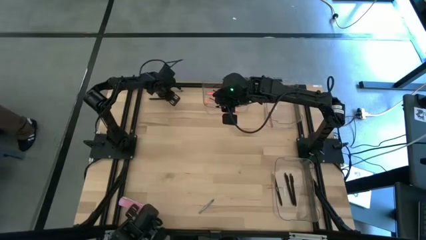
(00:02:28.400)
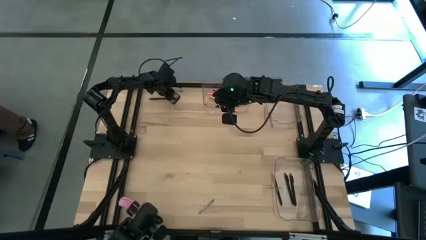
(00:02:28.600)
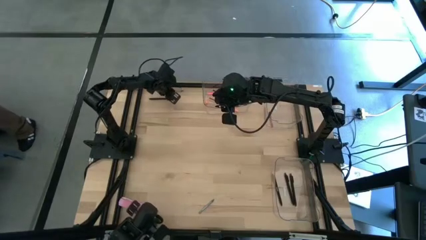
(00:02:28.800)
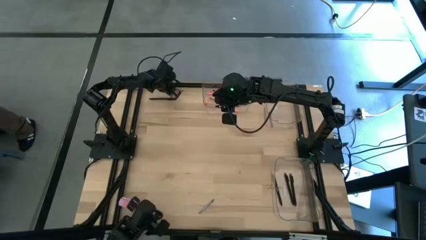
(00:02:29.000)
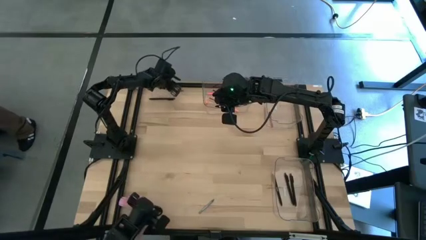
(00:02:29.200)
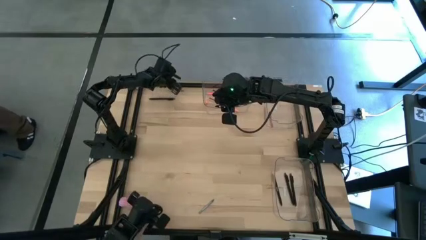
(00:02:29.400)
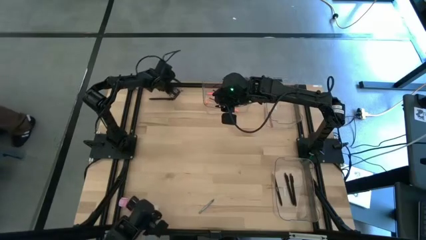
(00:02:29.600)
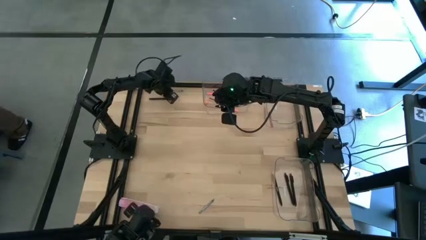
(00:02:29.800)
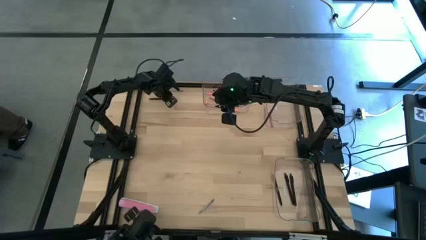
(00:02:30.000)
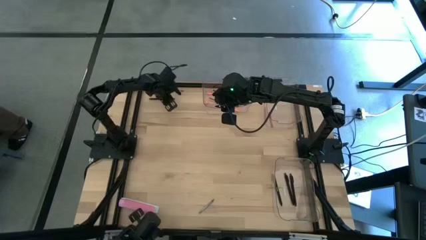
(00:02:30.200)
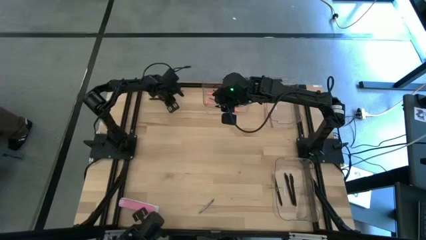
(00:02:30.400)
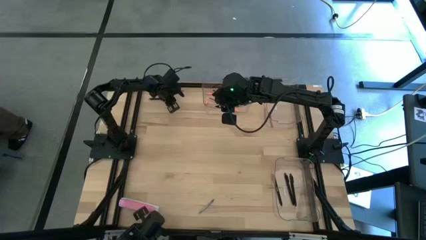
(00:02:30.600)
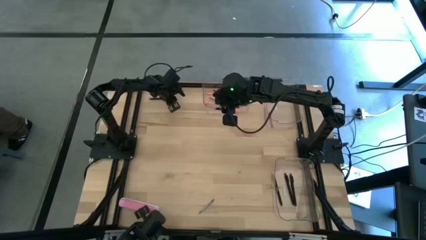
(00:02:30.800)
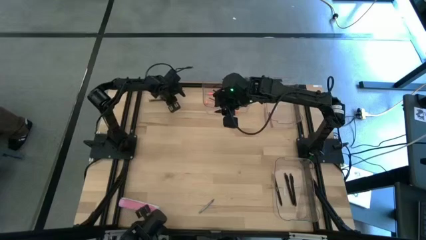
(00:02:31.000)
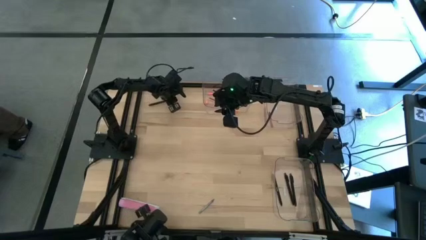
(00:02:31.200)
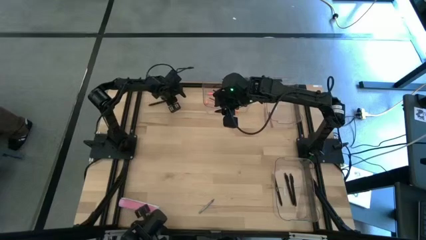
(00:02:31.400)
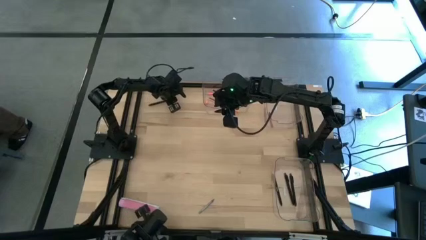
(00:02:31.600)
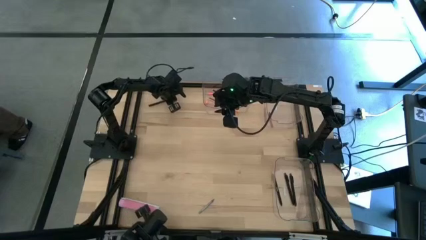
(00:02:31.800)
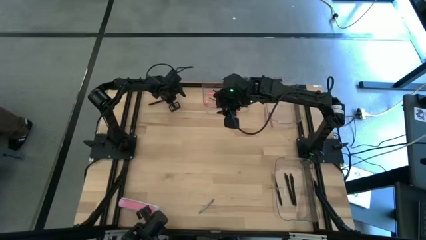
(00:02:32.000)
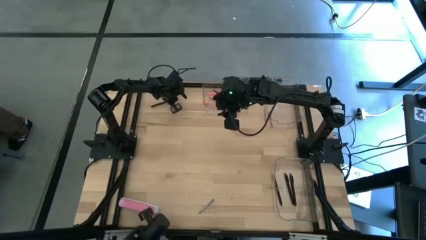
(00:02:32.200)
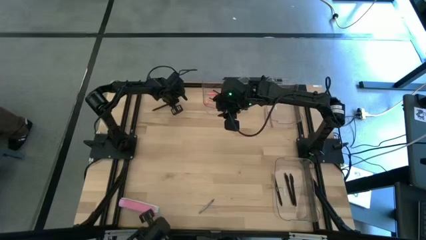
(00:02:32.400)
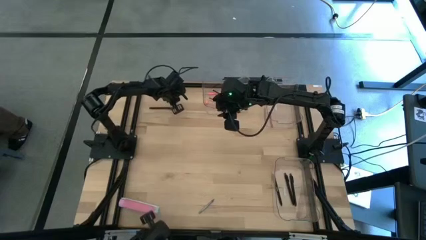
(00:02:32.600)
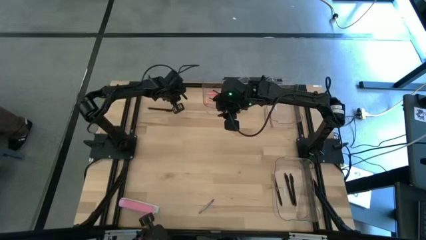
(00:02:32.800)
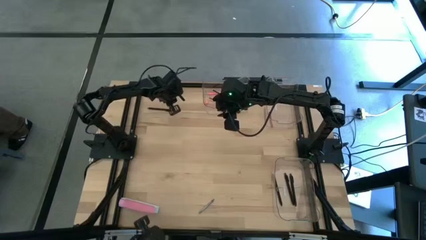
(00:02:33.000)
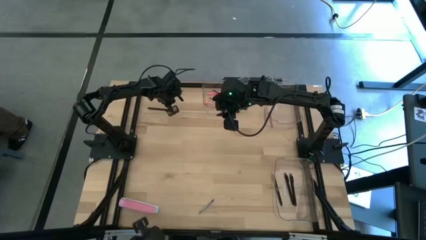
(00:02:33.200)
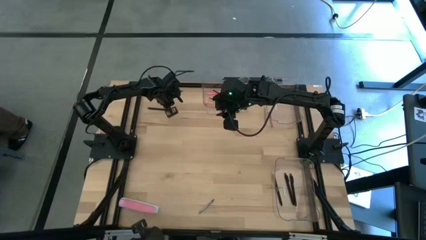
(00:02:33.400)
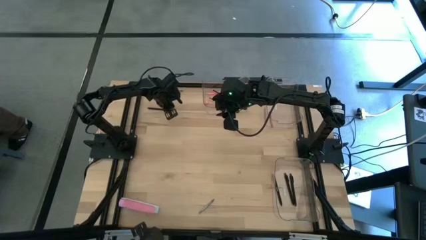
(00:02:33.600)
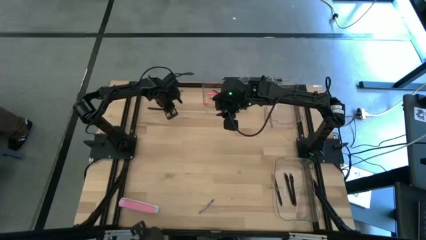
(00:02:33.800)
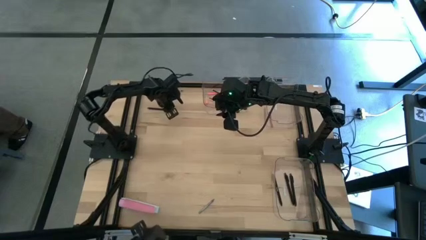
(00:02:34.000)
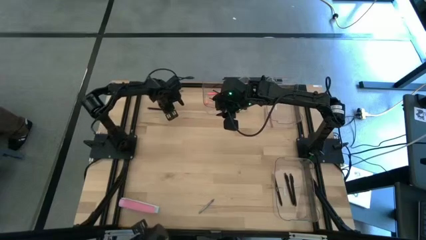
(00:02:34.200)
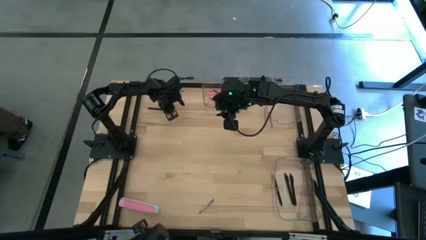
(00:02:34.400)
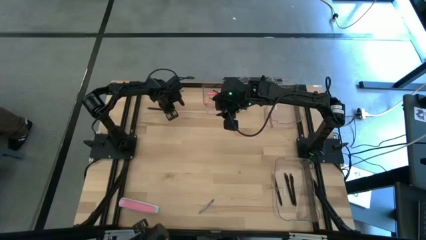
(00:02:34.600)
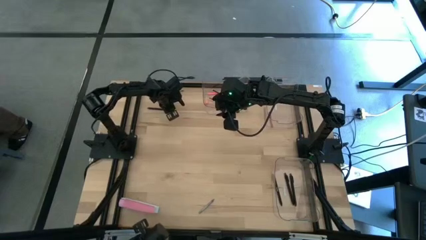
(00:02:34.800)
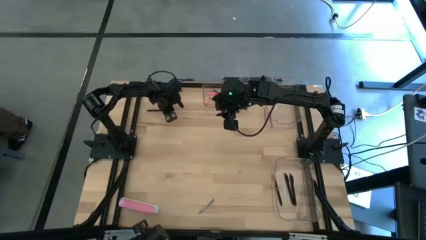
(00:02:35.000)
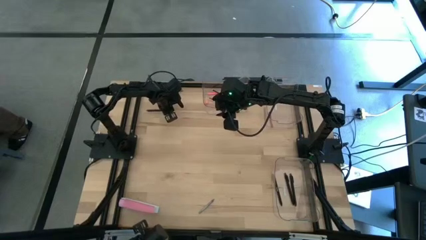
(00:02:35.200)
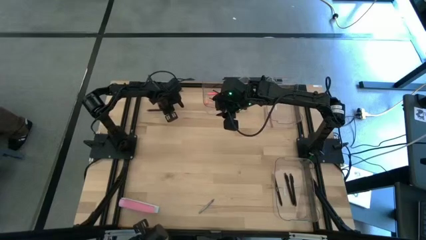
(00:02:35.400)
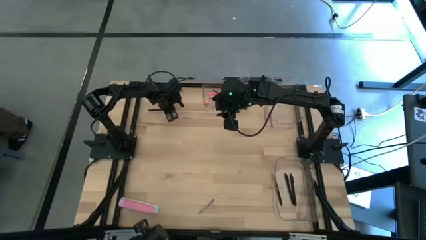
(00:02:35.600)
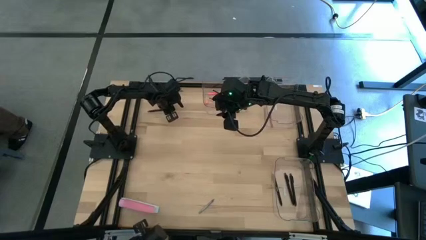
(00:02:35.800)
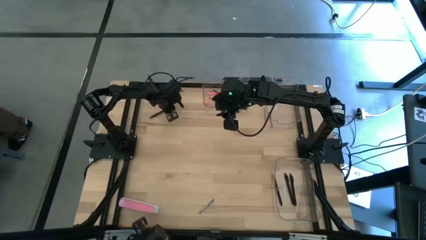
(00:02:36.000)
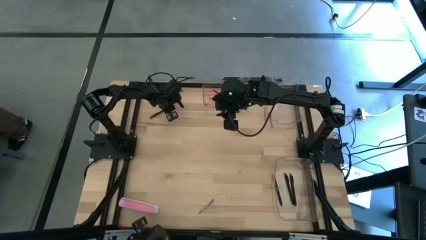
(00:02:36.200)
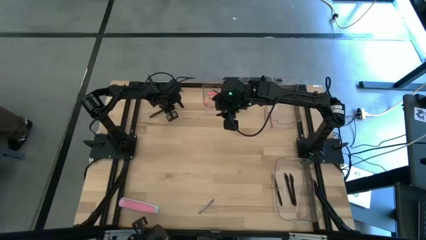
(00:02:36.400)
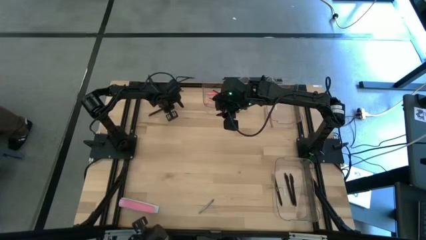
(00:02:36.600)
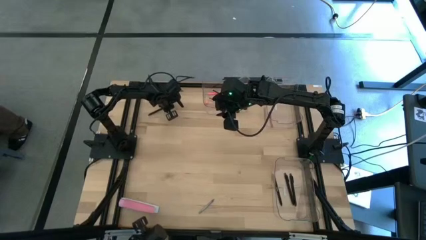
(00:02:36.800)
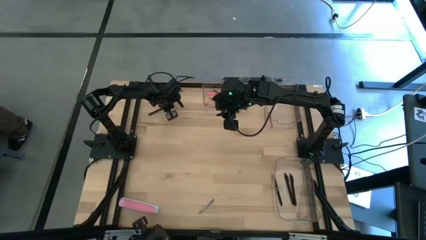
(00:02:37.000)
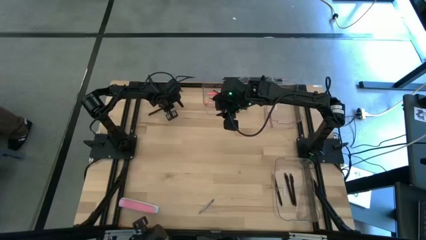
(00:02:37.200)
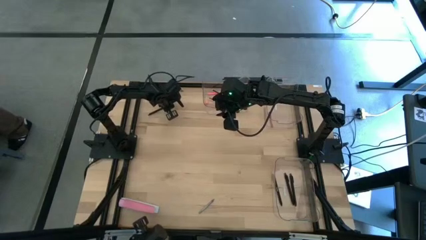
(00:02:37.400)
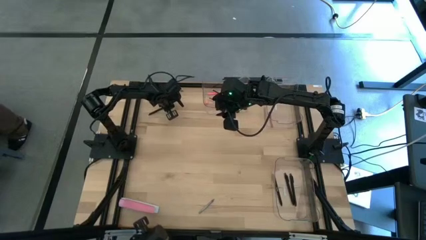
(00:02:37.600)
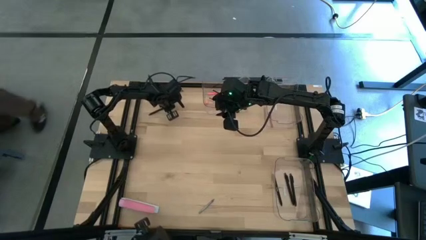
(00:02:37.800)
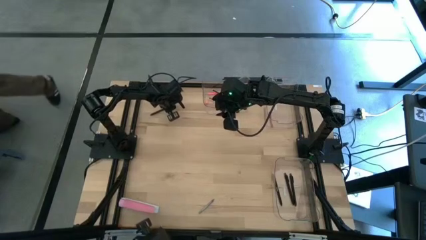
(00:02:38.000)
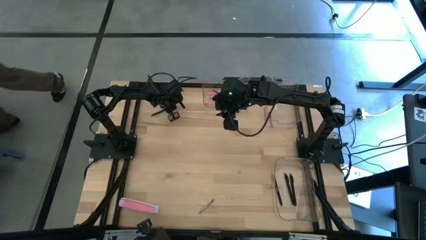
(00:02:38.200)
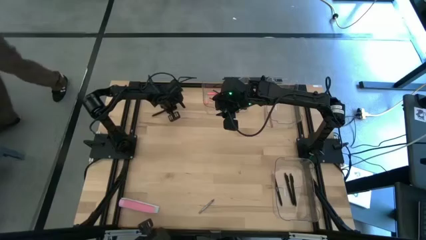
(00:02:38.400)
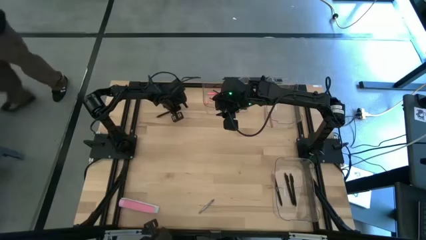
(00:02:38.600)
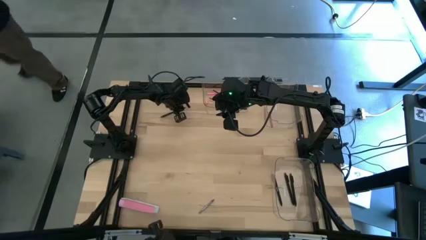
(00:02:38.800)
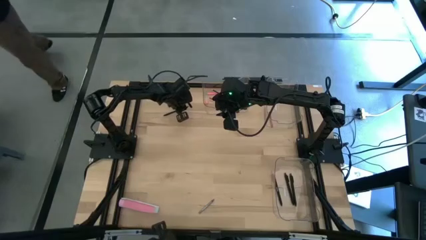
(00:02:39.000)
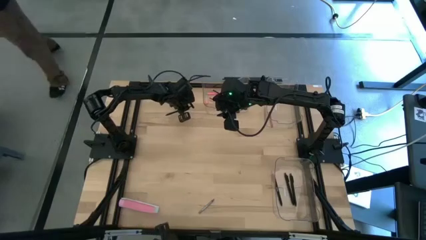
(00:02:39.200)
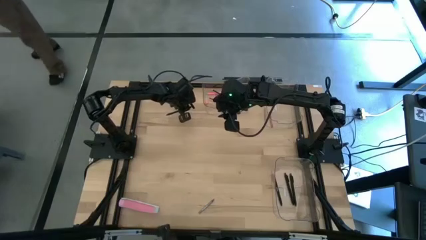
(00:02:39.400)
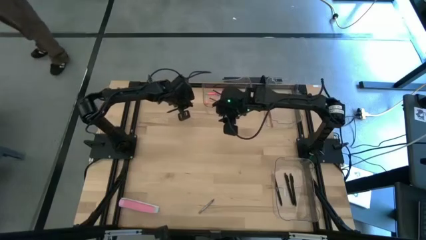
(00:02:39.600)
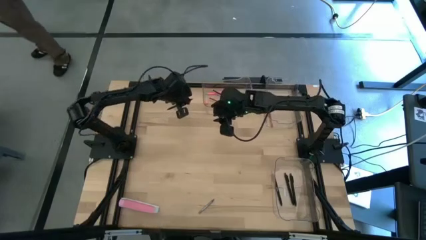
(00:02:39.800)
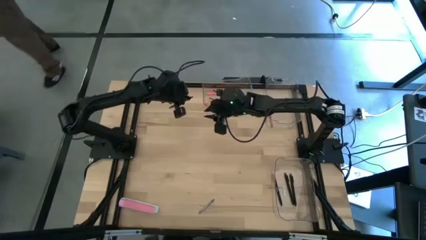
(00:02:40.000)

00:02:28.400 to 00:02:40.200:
Task: Sort crayons/erasers/pens/pencils in bins
Put the black pen into the bottom right transparent bin
